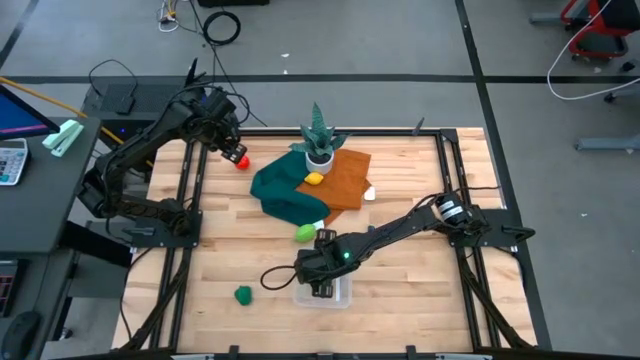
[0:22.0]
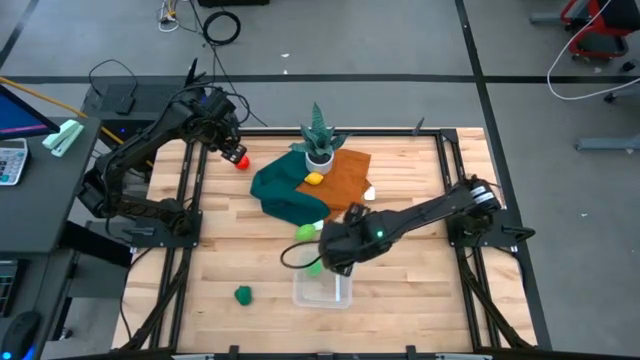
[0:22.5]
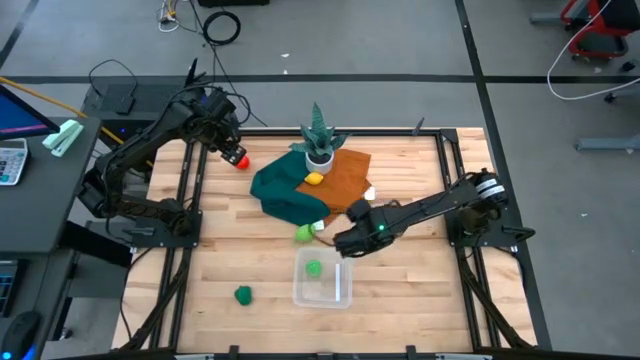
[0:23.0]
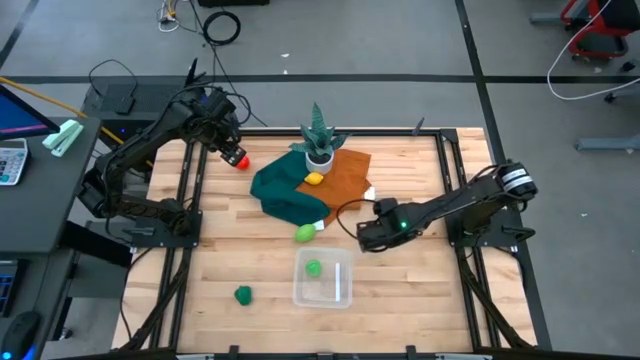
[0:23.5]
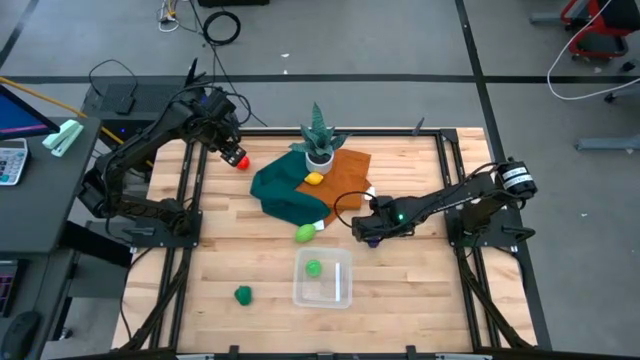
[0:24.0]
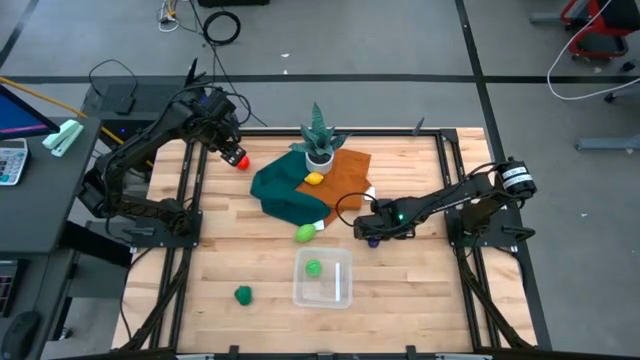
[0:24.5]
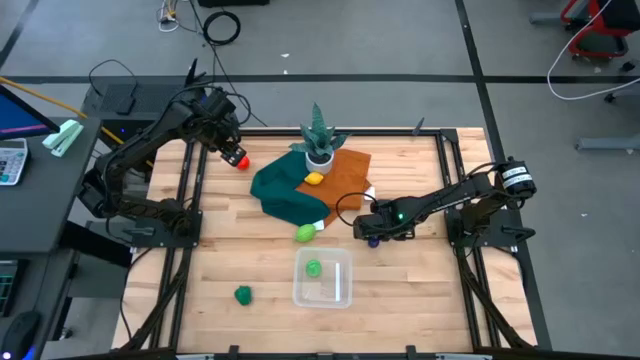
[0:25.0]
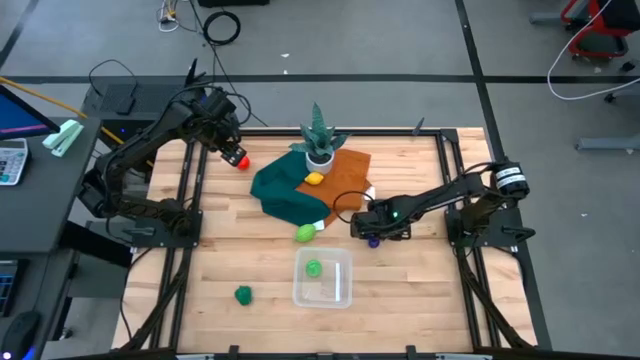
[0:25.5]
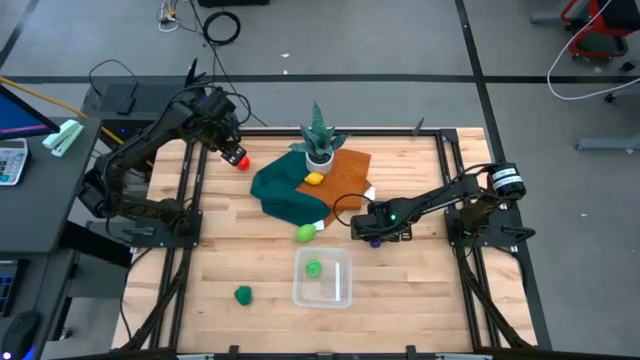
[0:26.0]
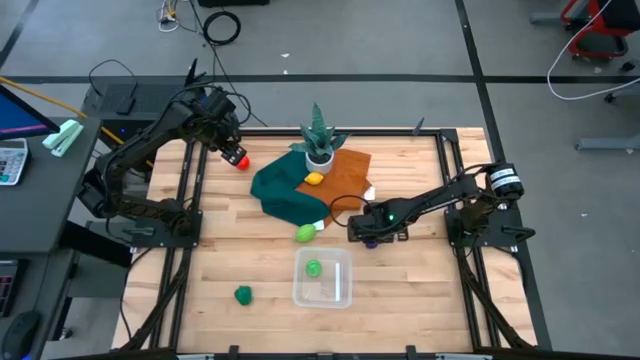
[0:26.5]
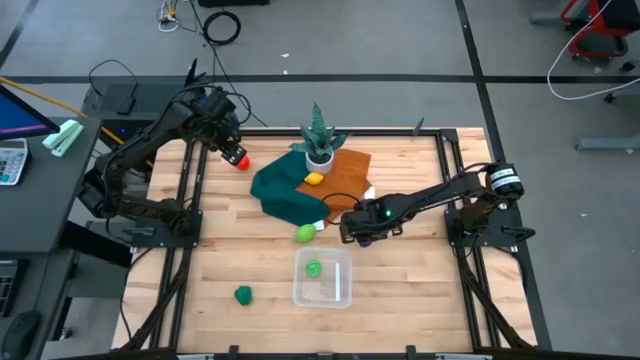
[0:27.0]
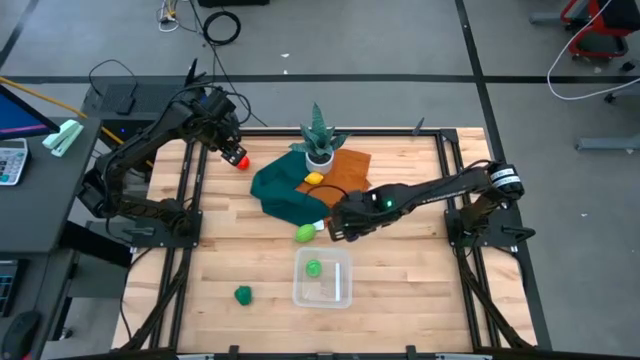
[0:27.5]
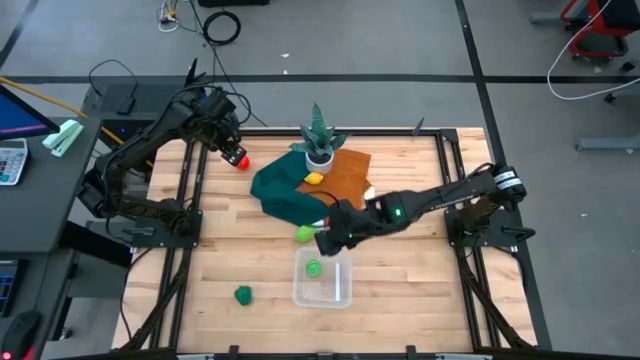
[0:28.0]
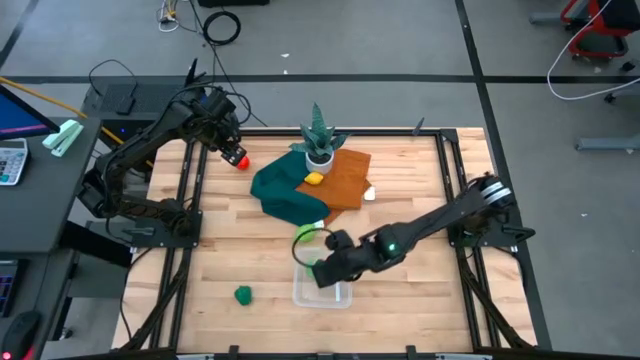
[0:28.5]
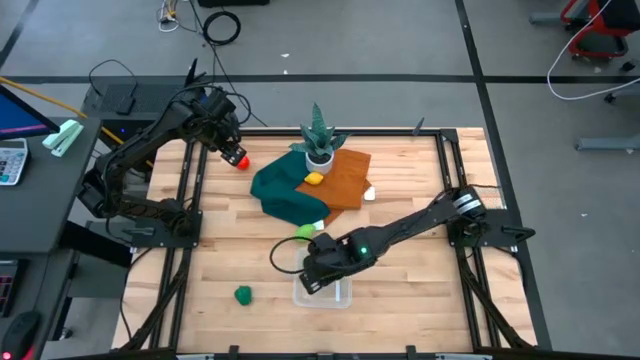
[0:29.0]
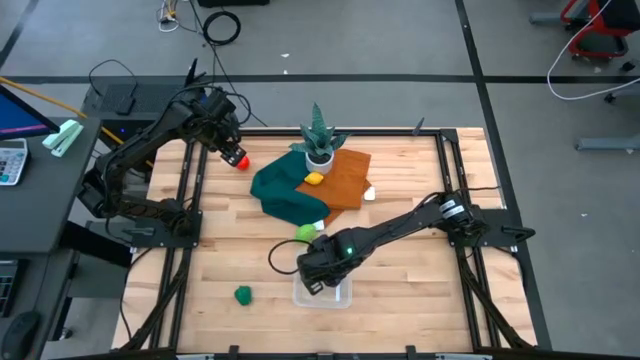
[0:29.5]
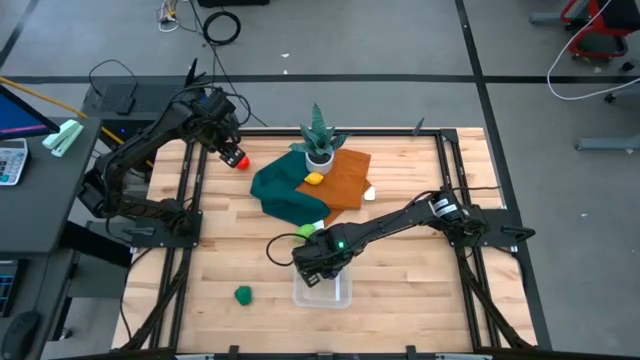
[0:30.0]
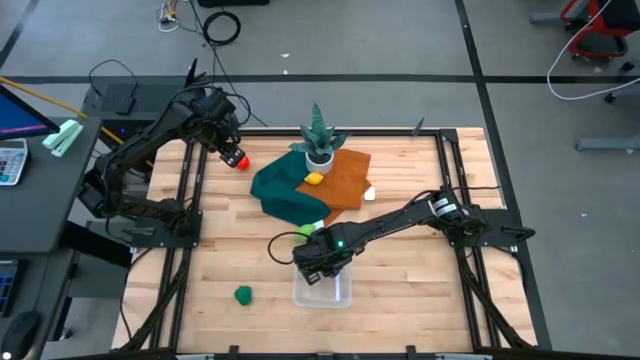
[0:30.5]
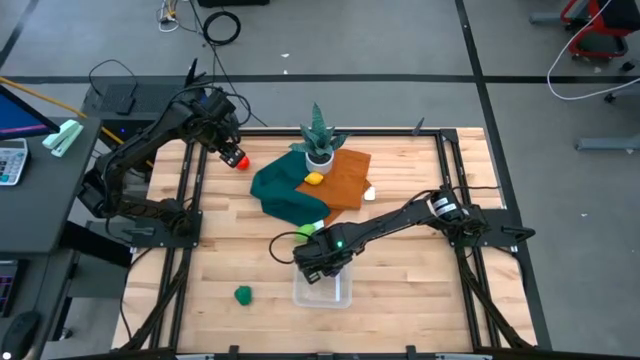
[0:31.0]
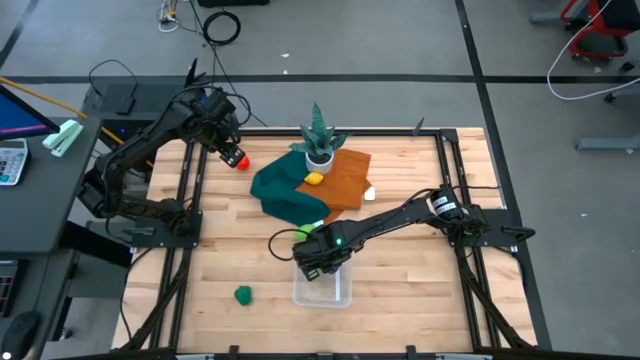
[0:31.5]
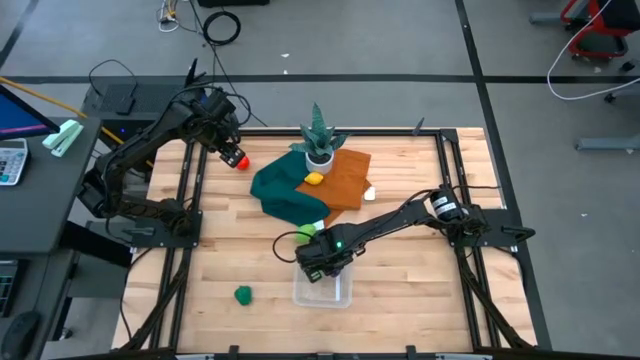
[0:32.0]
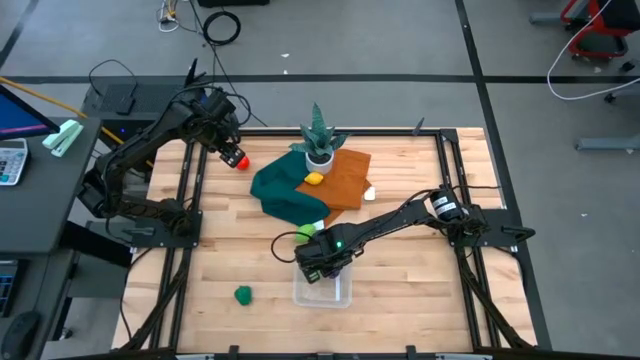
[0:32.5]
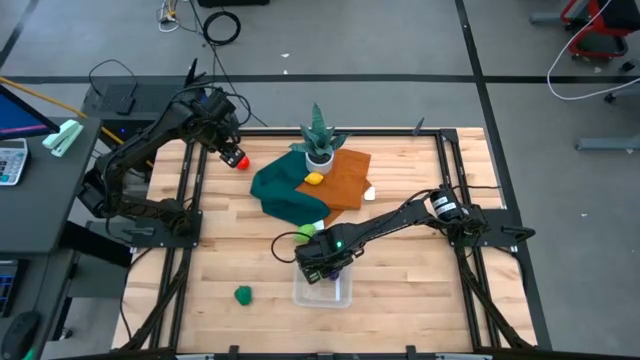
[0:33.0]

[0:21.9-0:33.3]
Task: Pick and placing Produce into tupperware
Put the purple eggplant into the transparent bin

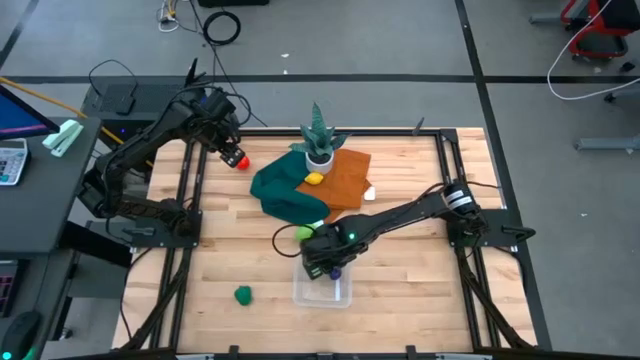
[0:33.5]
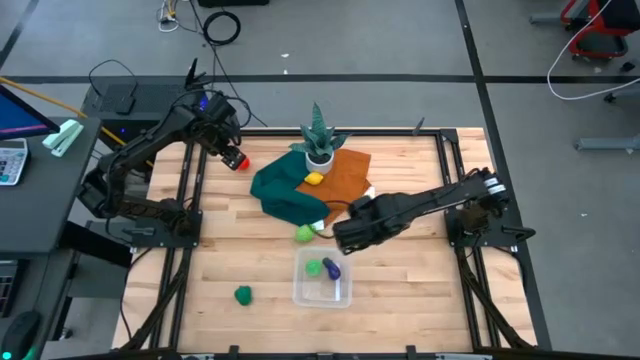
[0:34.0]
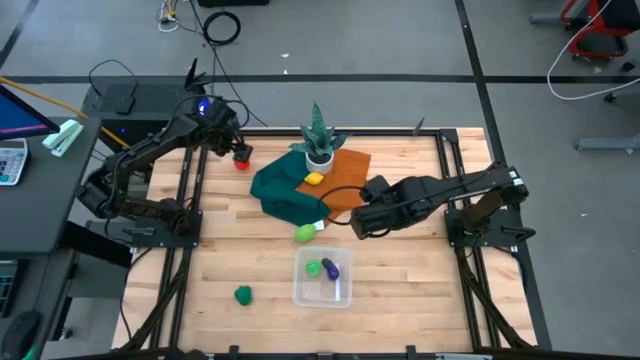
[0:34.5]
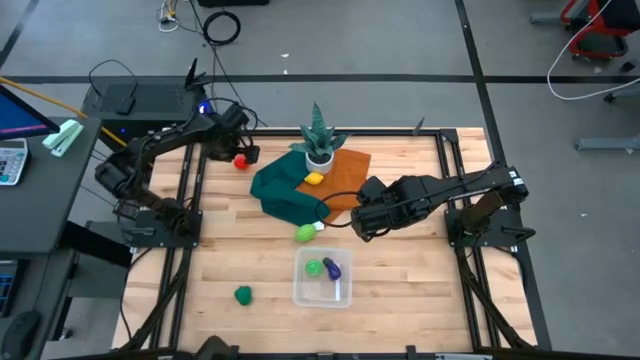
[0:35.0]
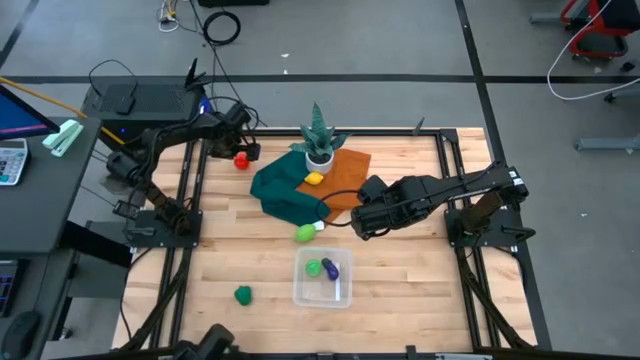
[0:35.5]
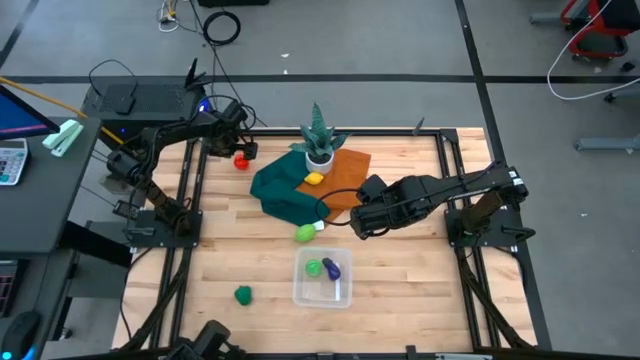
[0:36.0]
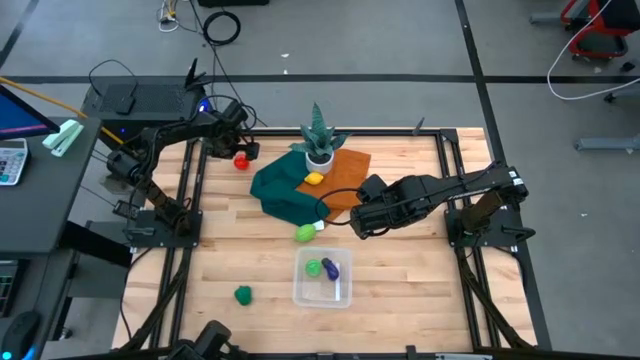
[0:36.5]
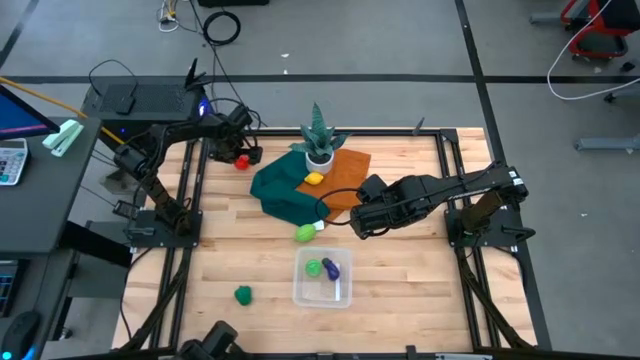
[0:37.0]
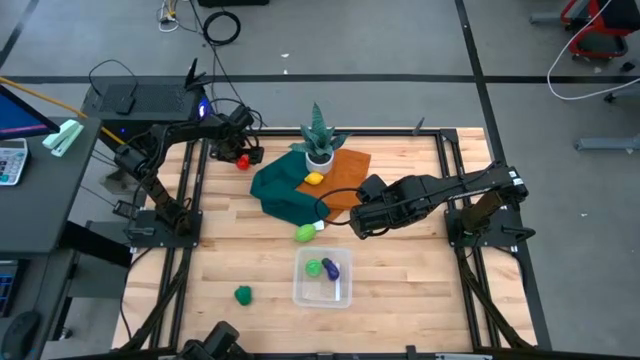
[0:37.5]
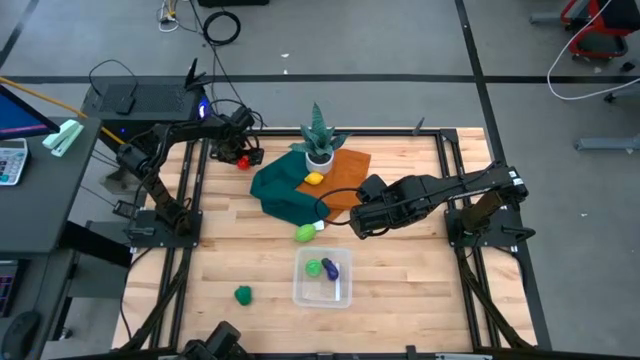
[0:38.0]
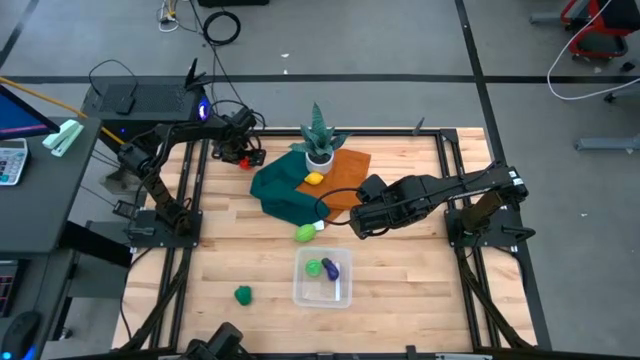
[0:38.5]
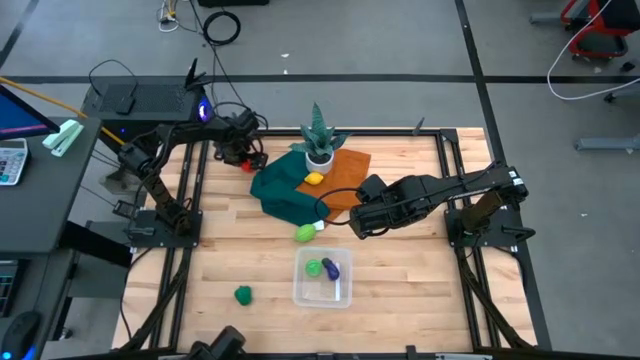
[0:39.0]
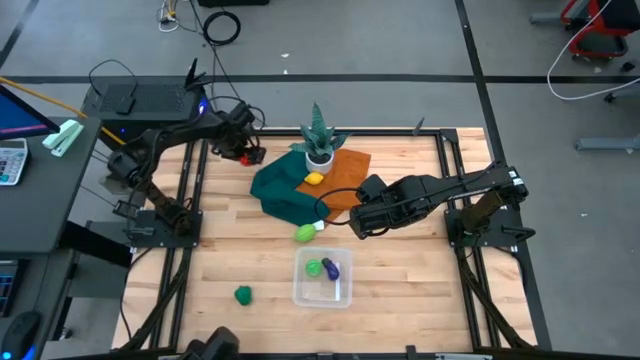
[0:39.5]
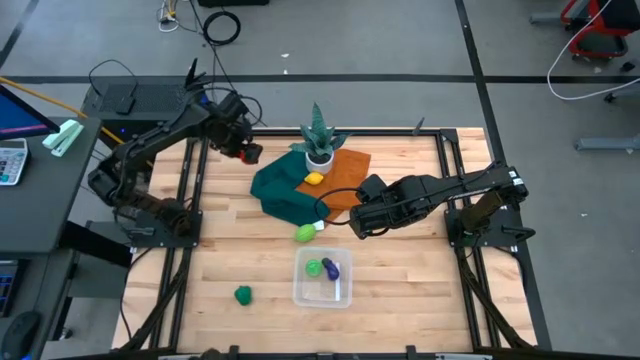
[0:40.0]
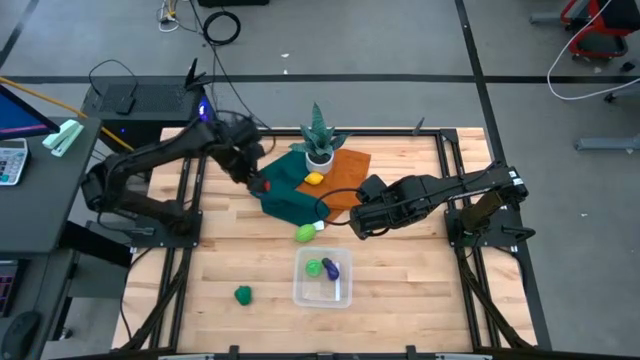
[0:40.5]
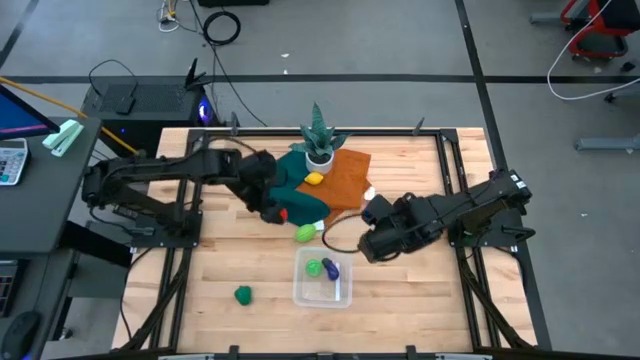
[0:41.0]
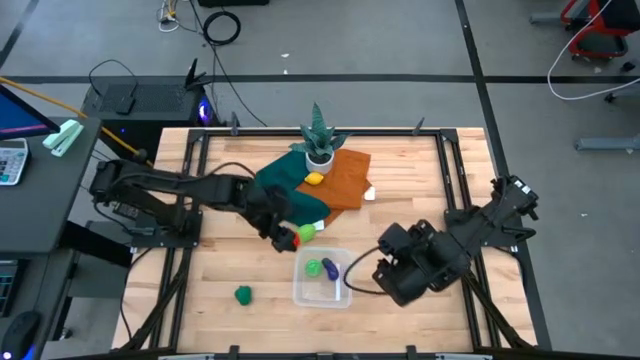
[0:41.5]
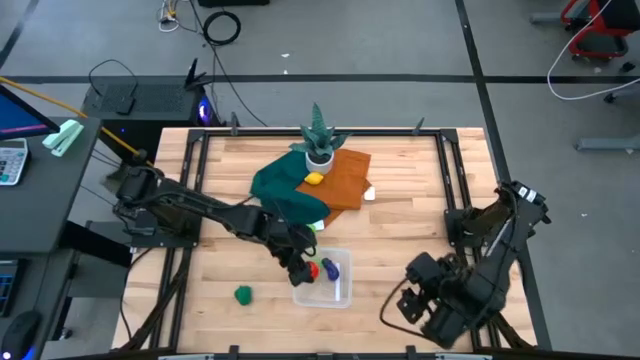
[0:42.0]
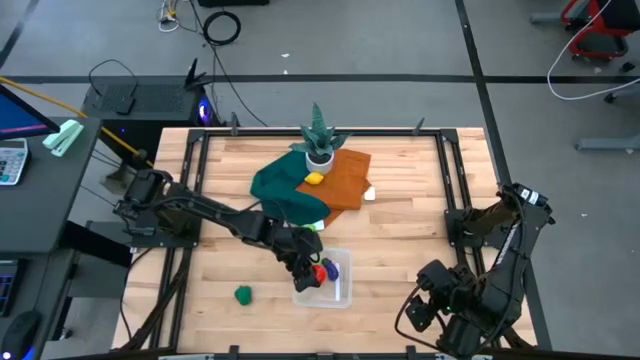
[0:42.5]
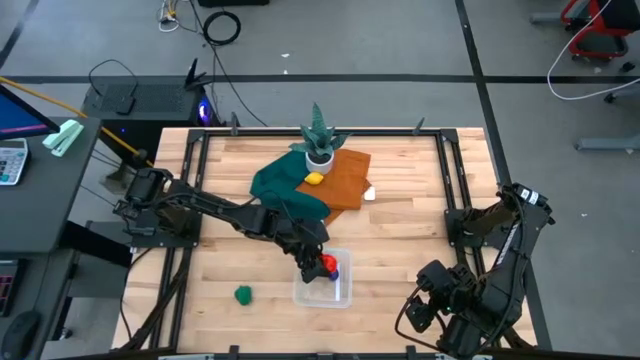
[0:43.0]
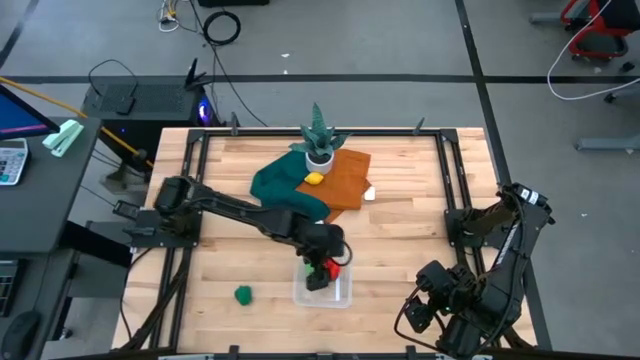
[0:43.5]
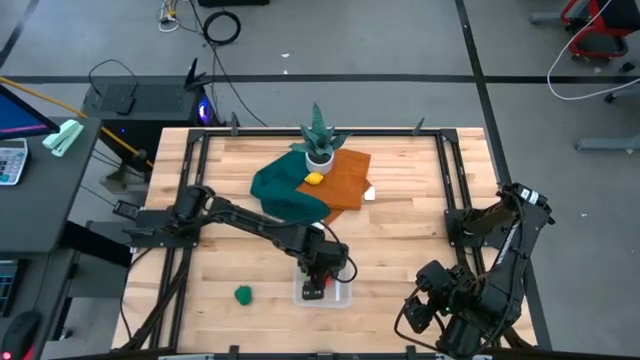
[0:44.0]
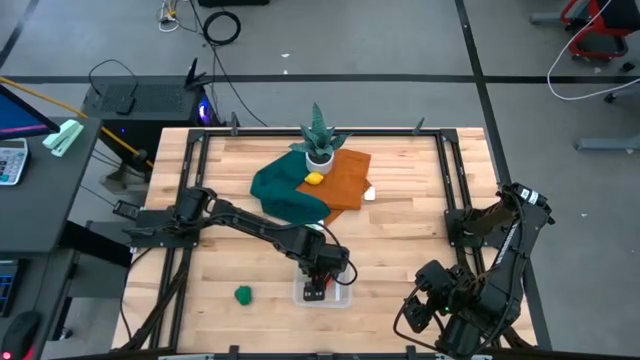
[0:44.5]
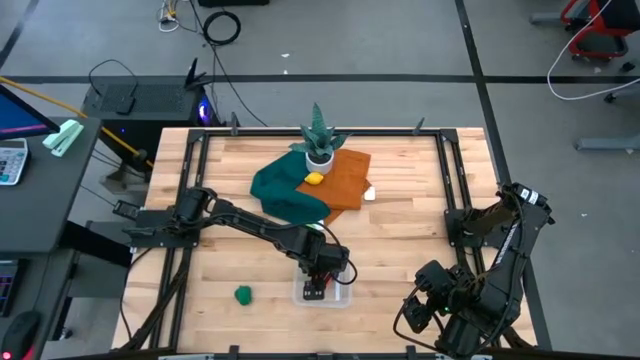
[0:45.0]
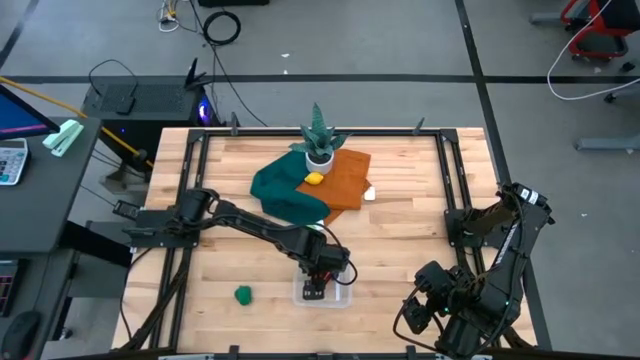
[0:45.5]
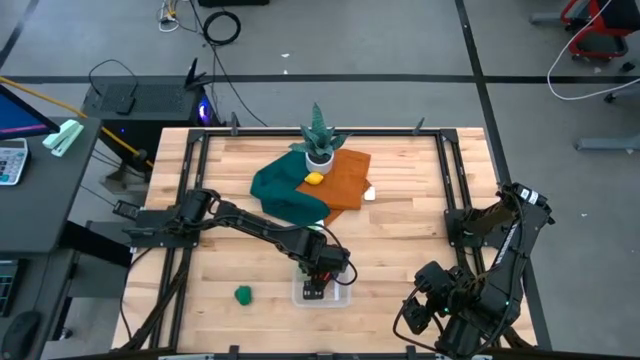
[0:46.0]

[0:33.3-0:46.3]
Put the red tomato into the transparent bin
